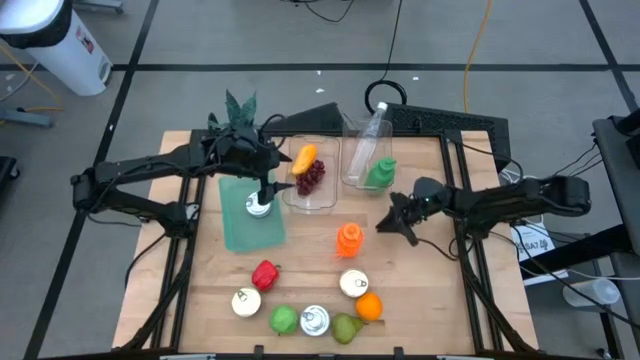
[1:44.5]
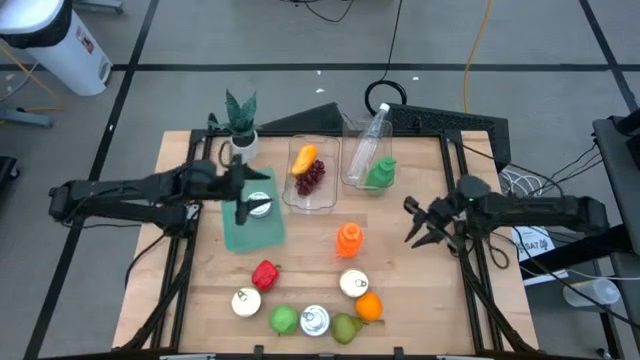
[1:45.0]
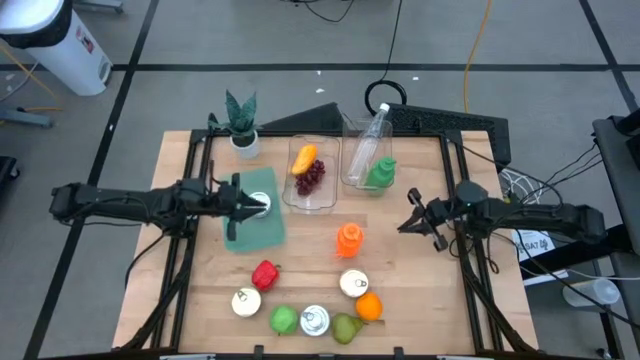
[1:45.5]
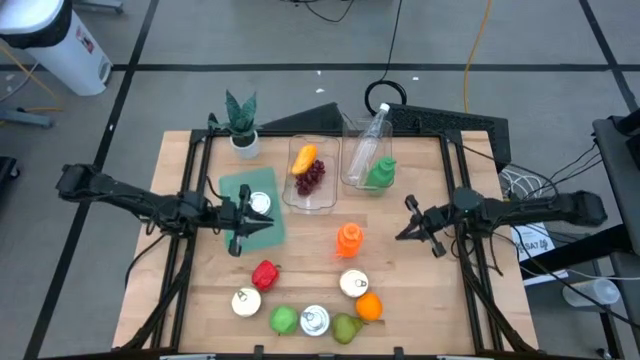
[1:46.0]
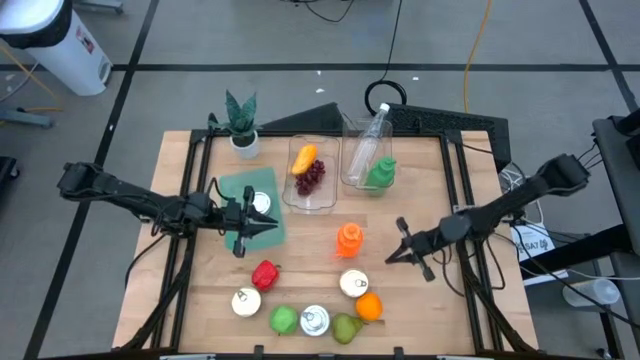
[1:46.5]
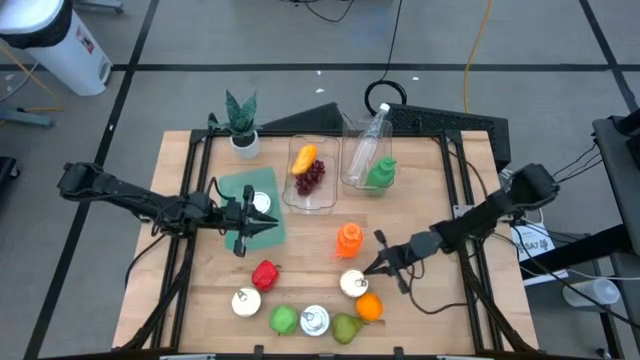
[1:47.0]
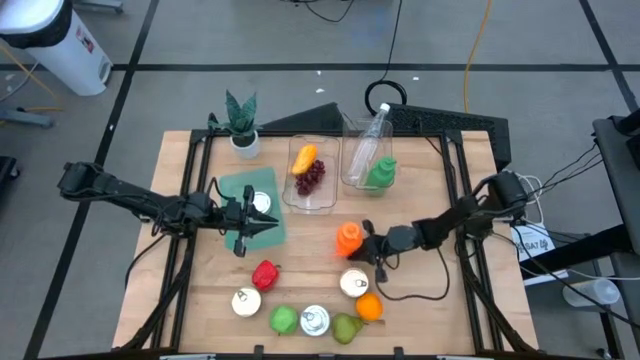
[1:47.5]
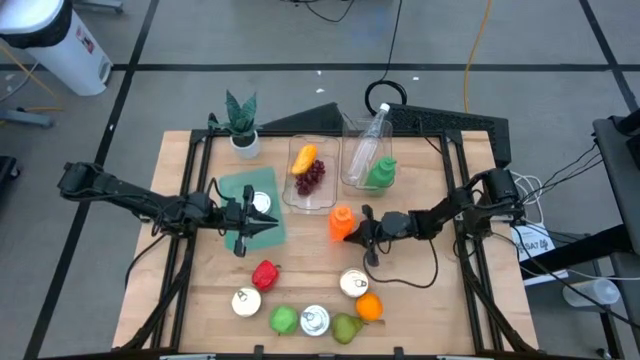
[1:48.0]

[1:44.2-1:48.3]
Task: Pick & Place Food Item
Adjust the orange water bottle

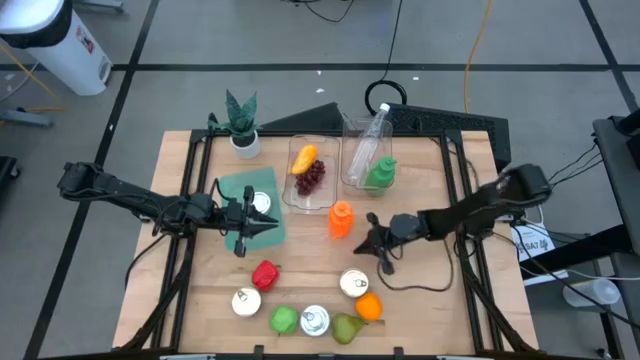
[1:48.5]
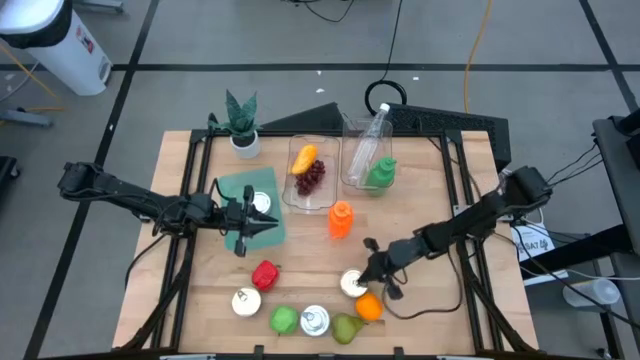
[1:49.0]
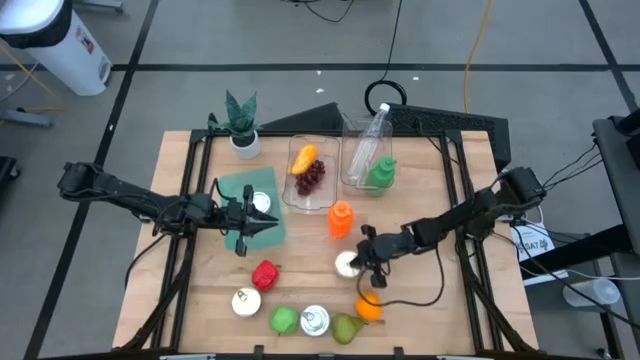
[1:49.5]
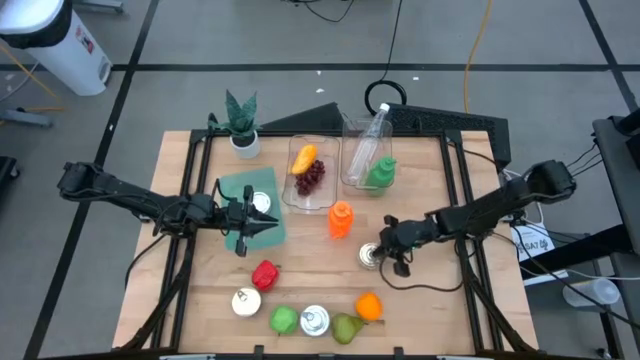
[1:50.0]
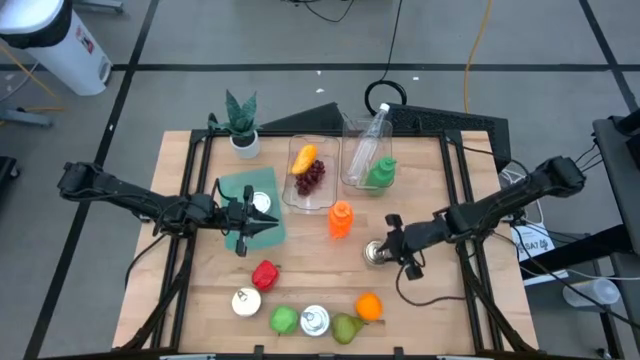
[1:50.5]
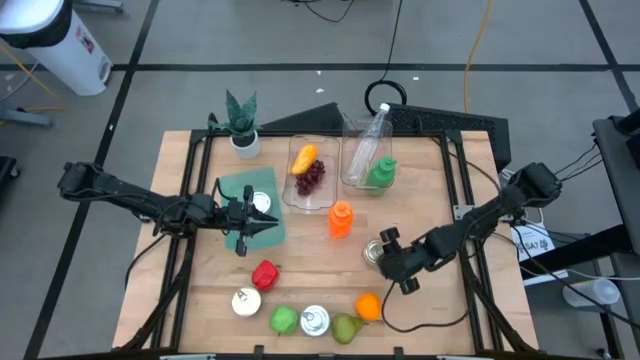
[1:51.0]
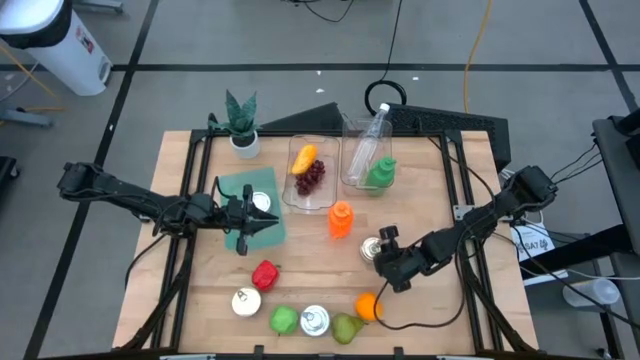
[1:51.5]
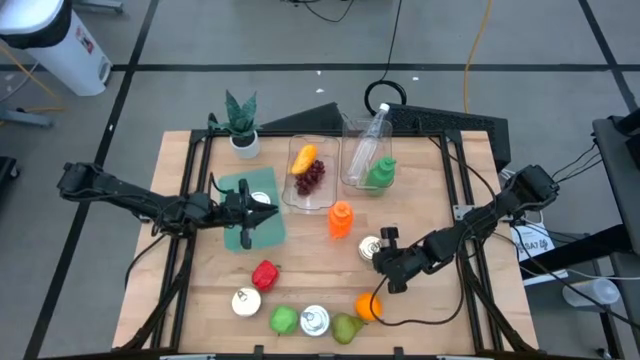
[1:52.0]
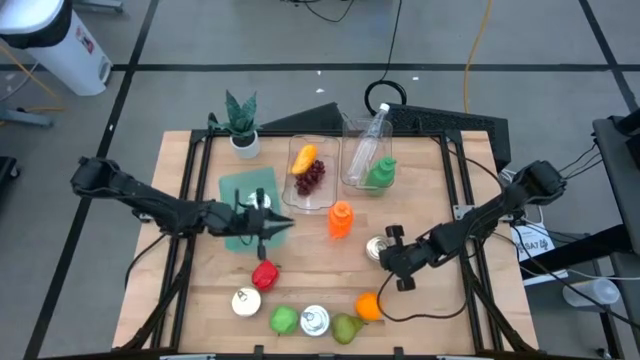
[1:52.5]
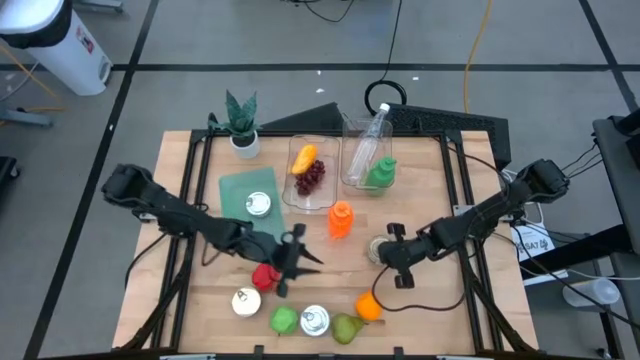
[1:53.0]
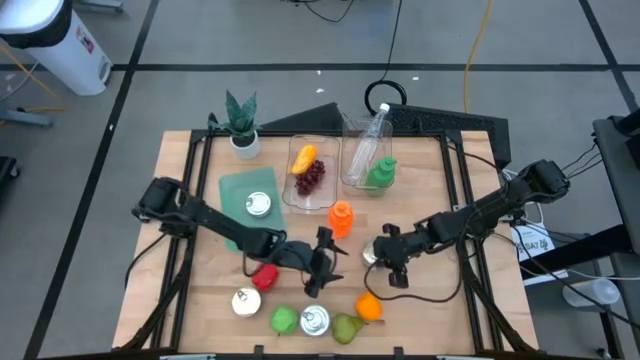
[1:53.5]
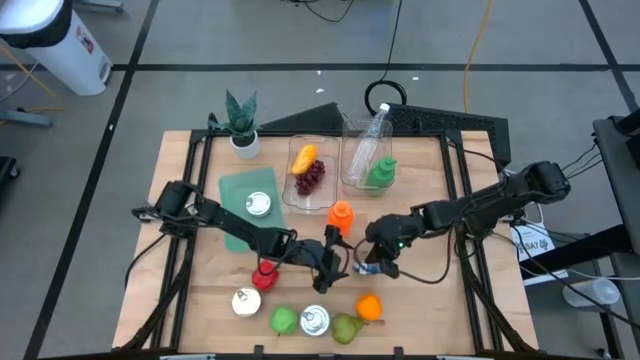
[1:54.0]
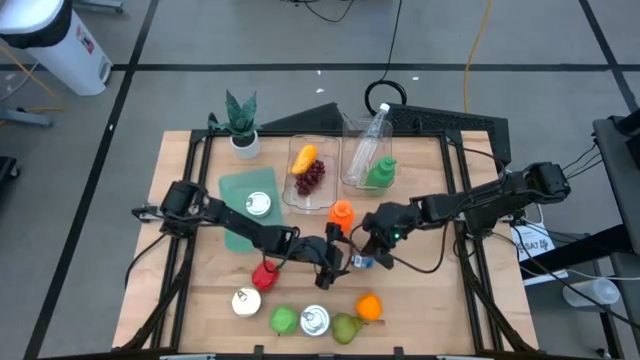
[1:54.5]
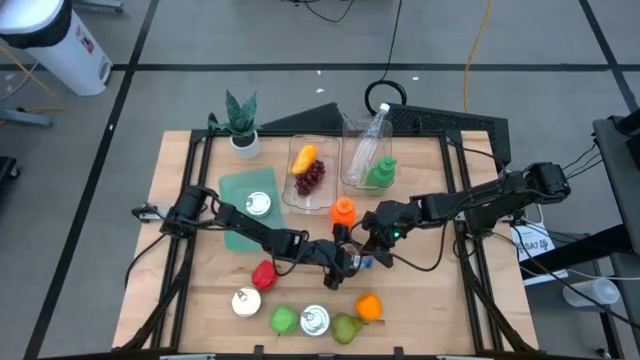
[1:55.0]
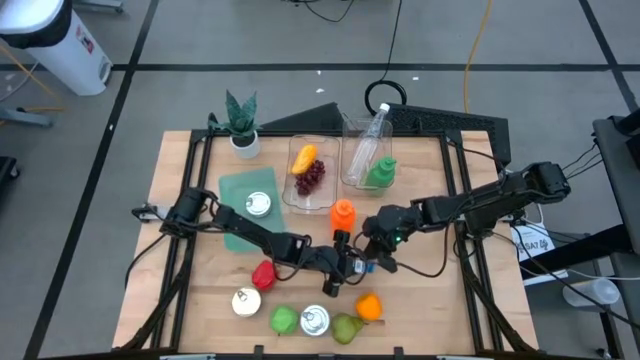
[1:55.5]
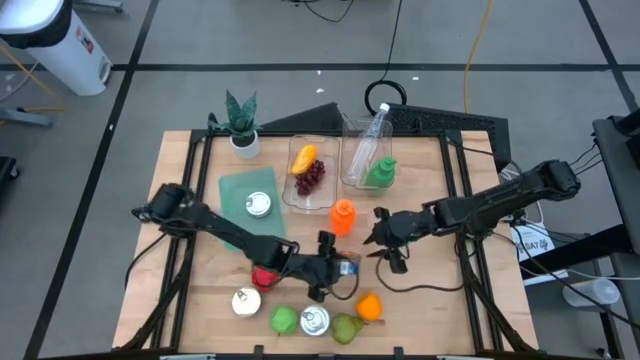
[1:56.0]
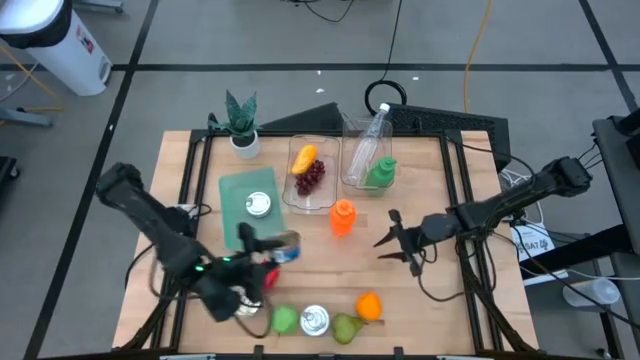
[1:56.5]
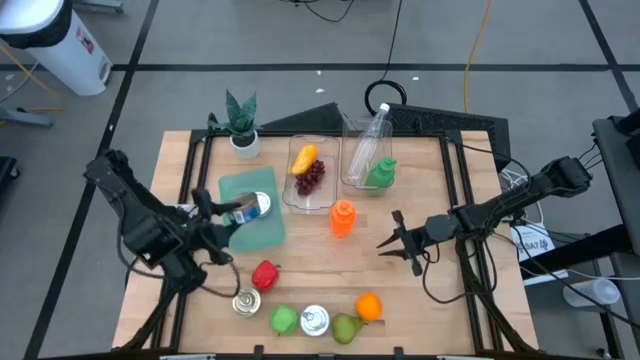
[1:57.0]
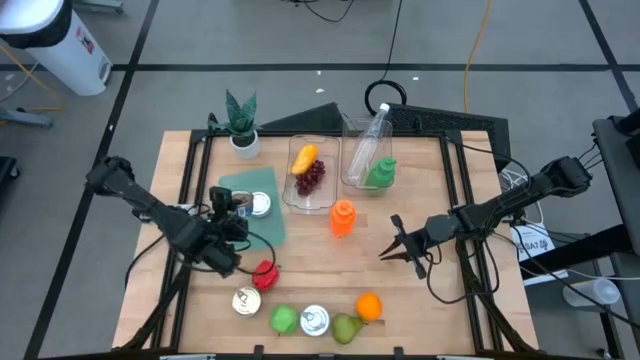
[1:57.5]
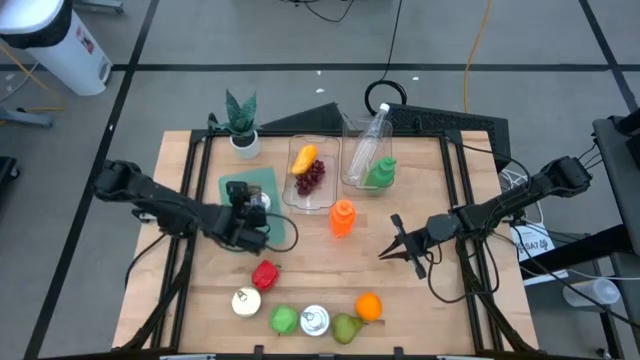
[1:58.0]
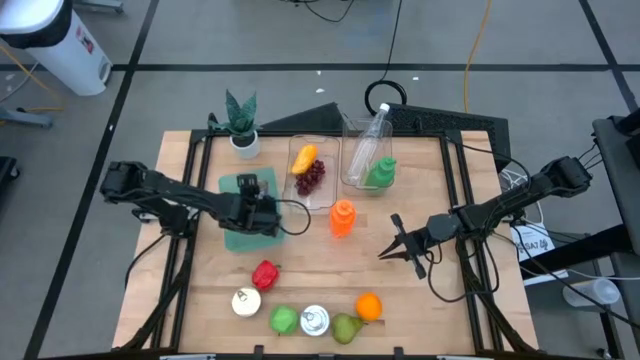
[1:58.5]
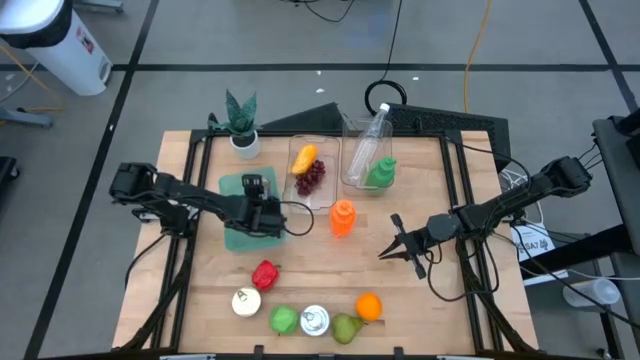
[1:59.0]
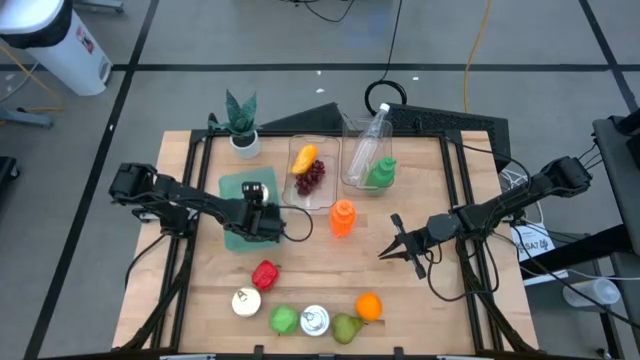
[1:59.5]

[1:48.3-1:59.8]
Stack the right blue and pink tuna can on top of the green tuna can in the blue bin

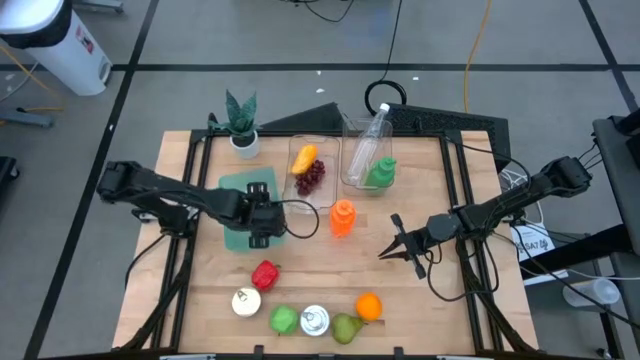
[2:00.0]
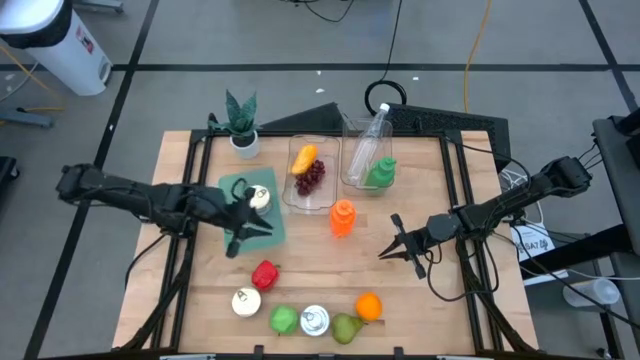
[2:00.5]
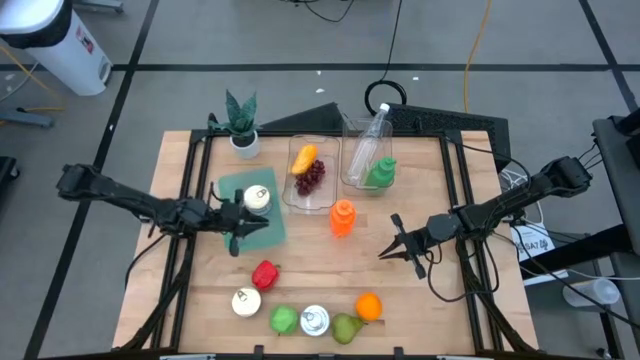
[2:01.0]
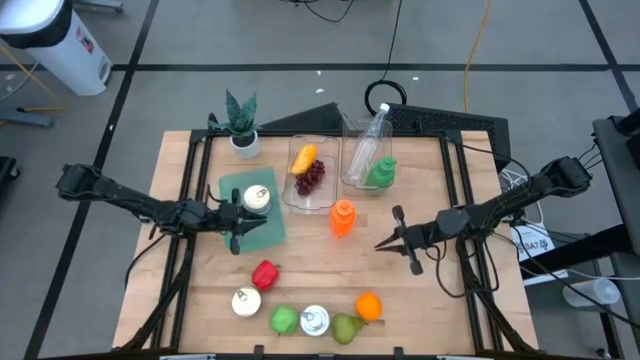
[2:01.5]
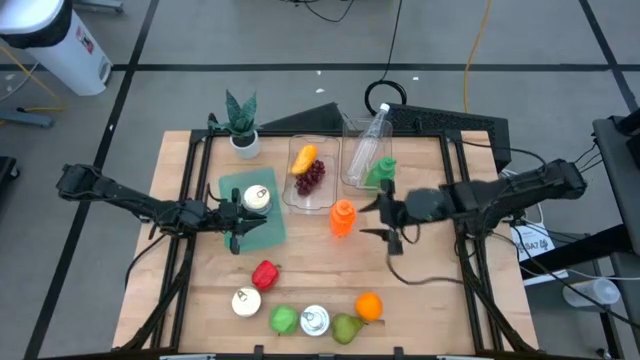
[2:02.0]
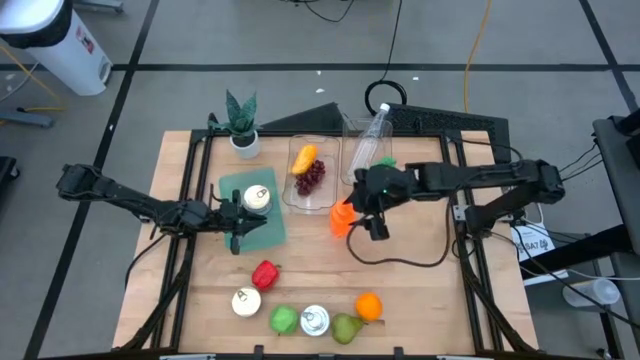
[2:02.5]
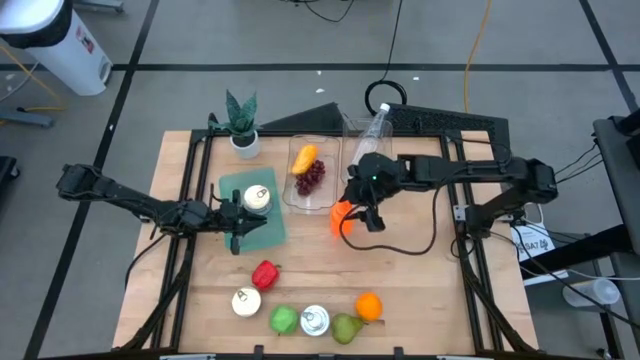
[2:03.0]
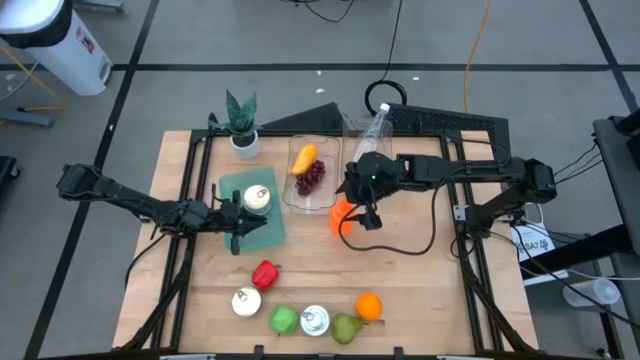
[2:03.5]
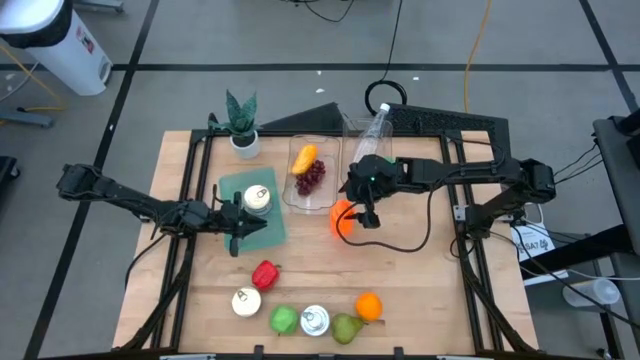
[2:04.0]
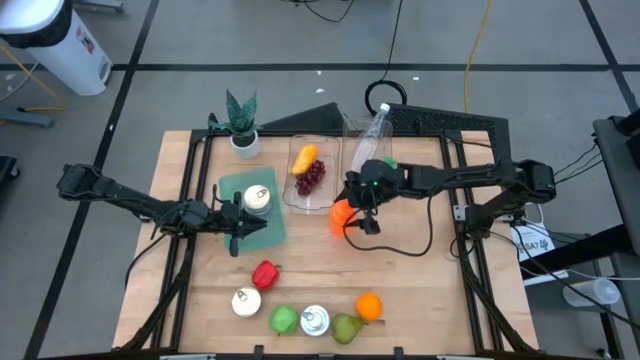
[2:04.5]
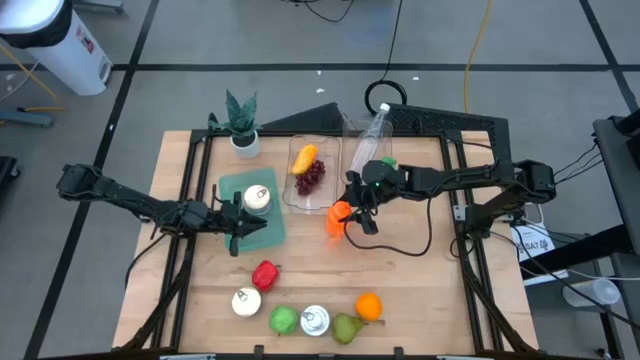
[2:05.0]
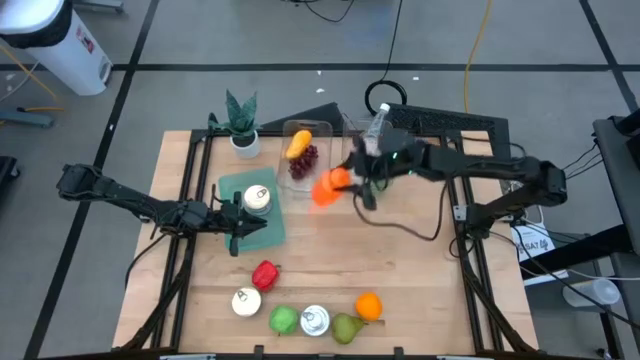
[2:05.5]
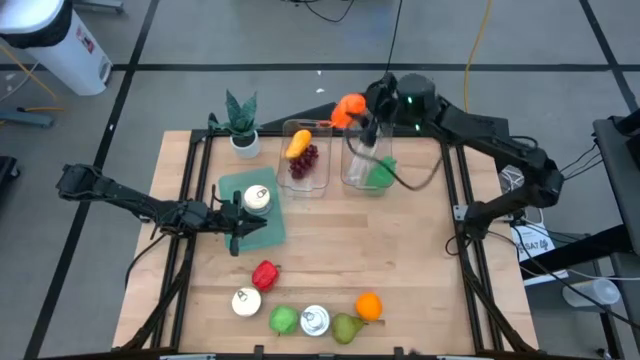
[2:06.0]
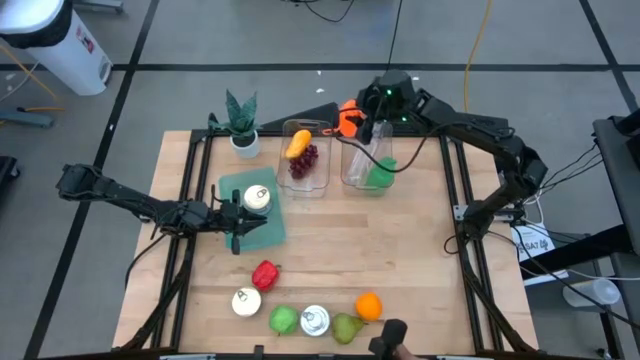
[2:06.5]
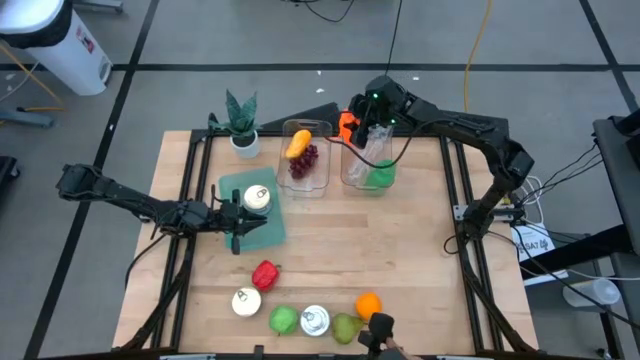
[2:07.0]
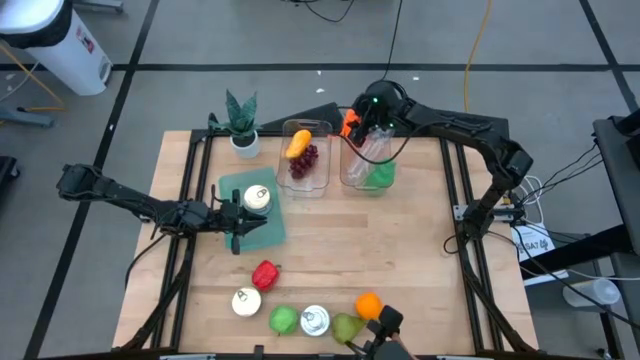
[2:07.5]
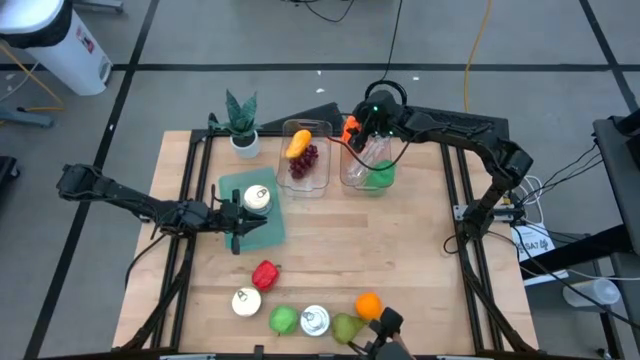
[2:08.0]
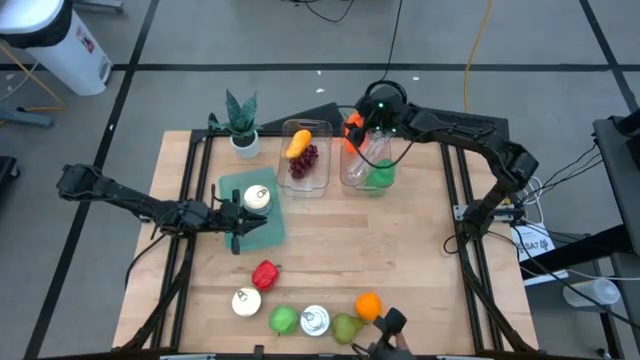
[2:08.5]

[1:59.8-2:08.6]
Put the orange water bottle into the right transparent bin
